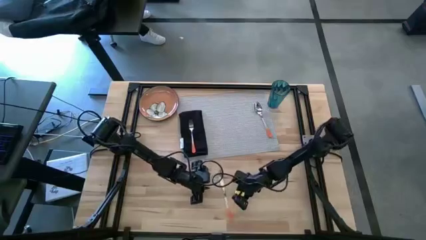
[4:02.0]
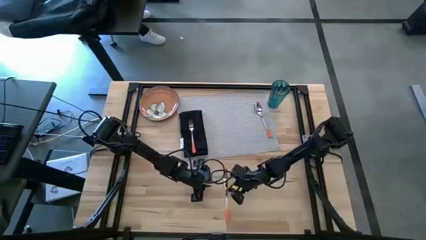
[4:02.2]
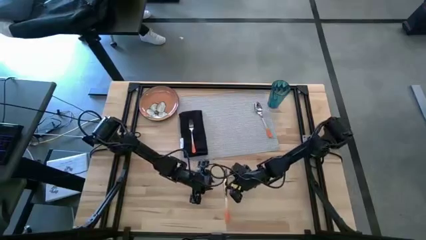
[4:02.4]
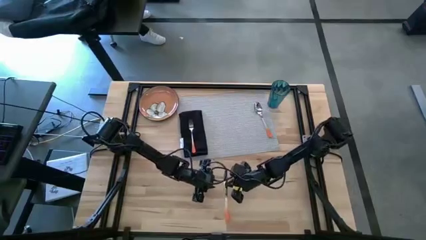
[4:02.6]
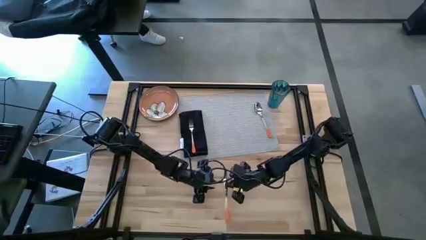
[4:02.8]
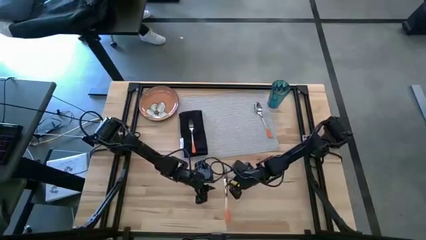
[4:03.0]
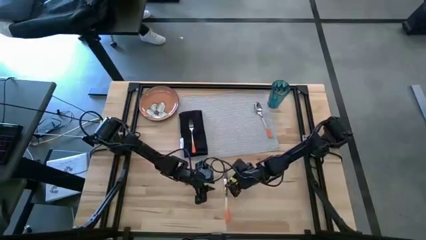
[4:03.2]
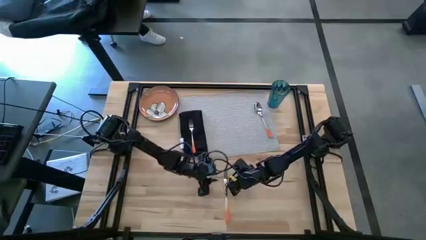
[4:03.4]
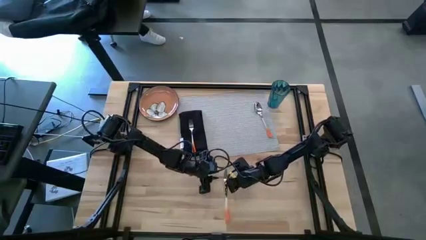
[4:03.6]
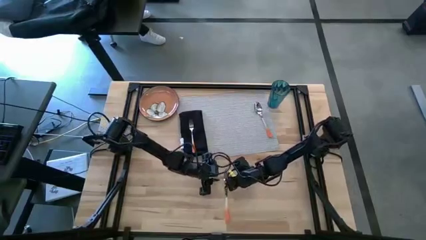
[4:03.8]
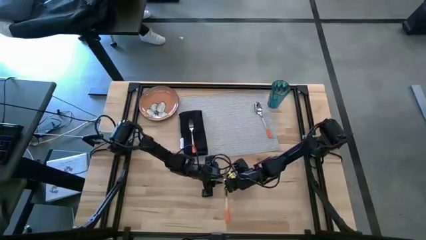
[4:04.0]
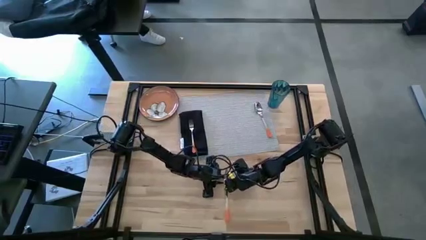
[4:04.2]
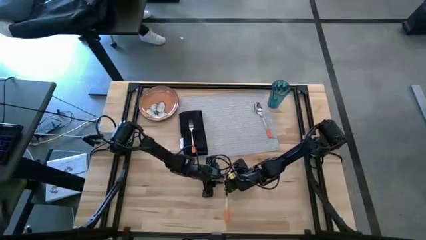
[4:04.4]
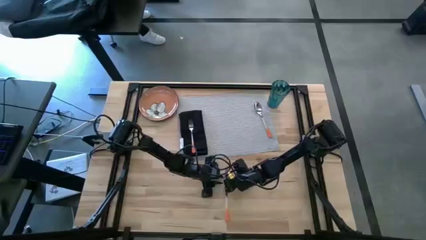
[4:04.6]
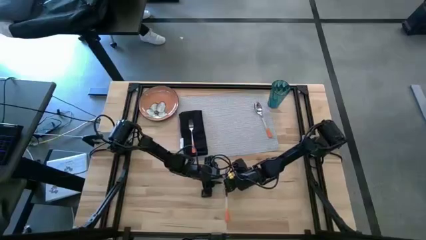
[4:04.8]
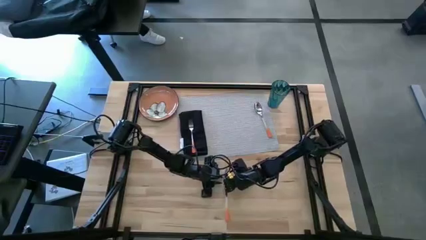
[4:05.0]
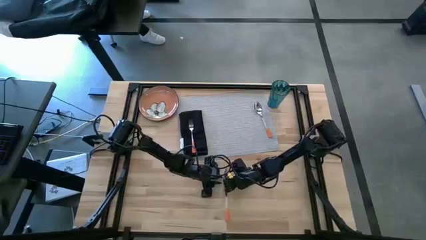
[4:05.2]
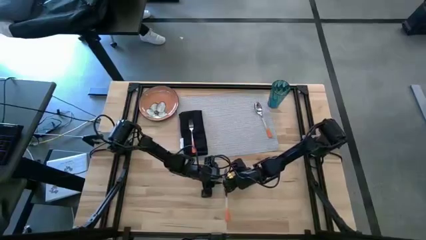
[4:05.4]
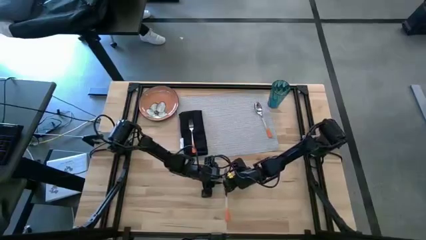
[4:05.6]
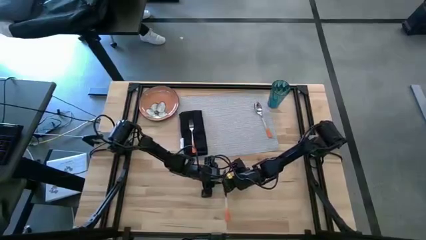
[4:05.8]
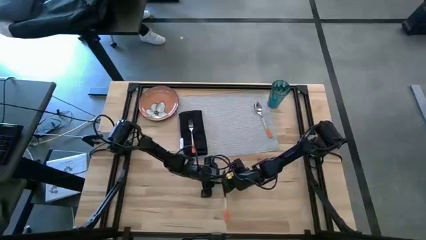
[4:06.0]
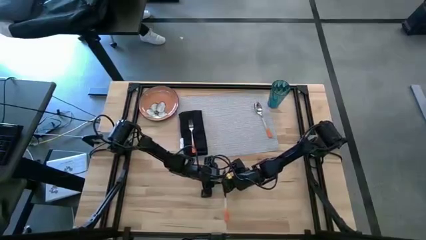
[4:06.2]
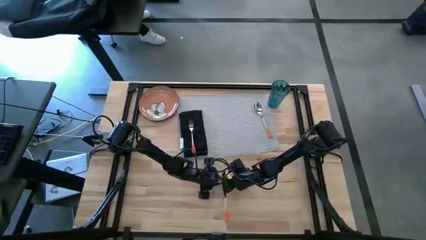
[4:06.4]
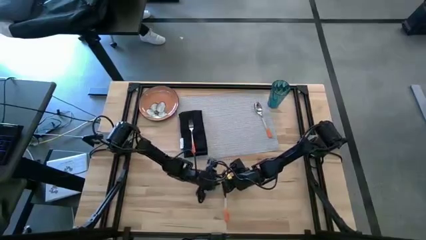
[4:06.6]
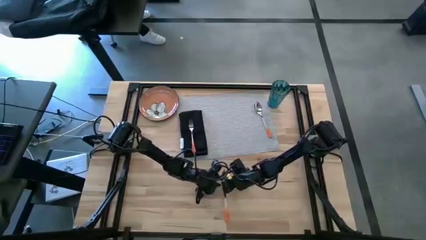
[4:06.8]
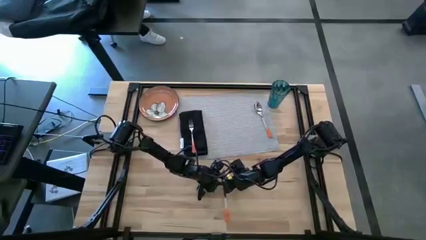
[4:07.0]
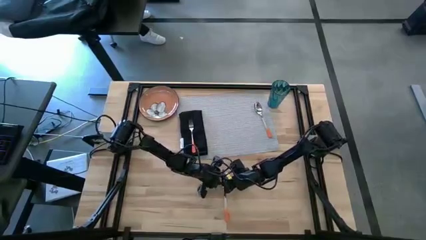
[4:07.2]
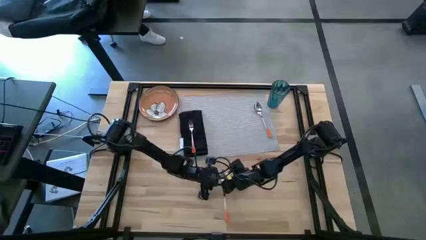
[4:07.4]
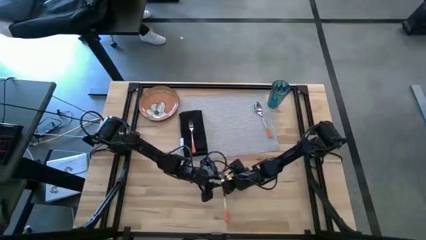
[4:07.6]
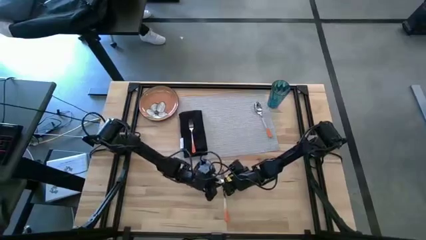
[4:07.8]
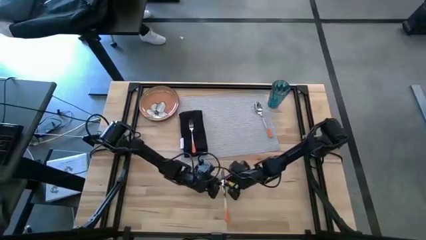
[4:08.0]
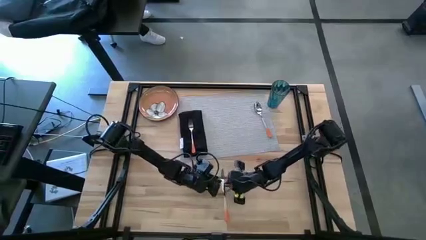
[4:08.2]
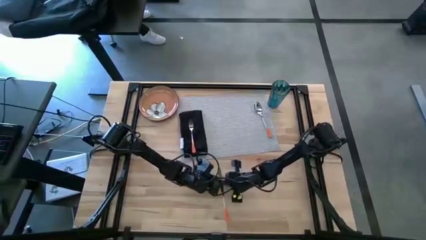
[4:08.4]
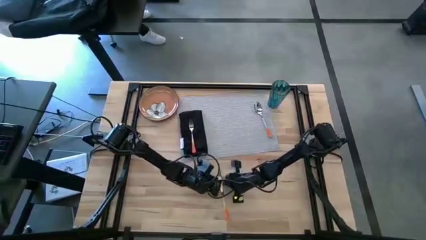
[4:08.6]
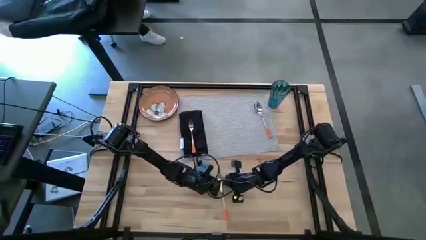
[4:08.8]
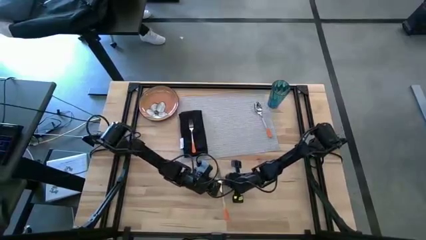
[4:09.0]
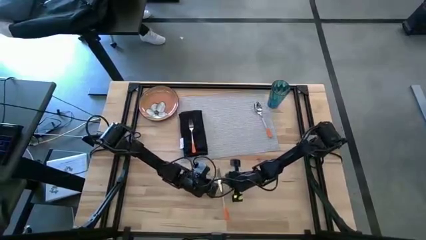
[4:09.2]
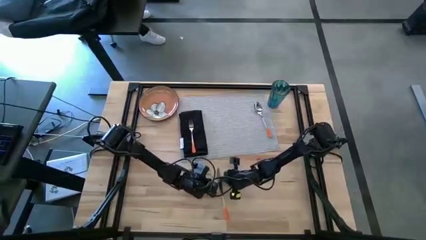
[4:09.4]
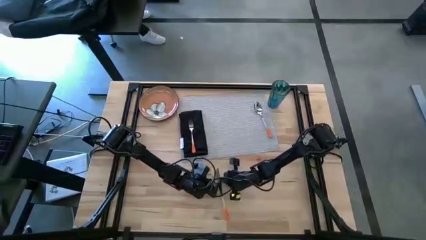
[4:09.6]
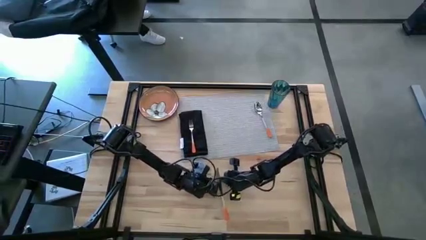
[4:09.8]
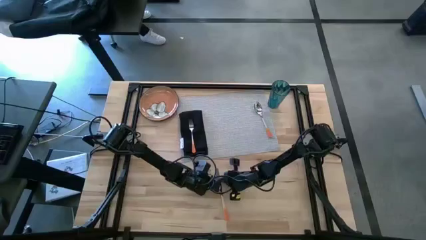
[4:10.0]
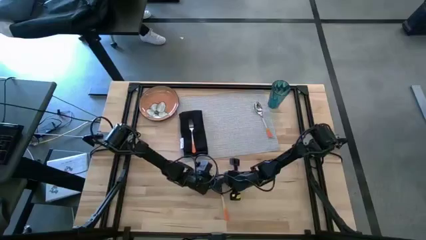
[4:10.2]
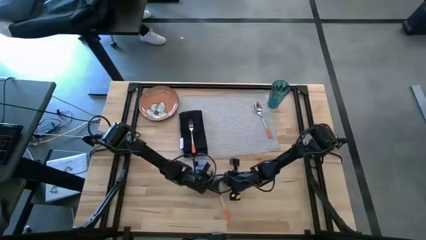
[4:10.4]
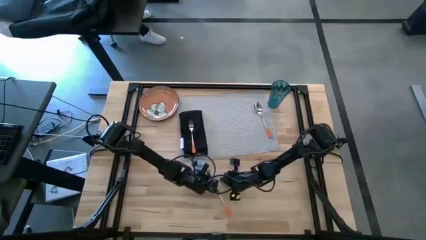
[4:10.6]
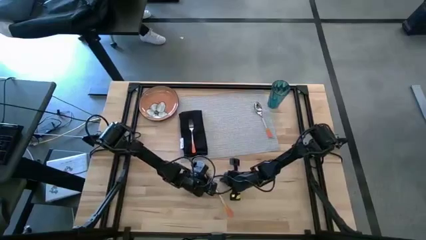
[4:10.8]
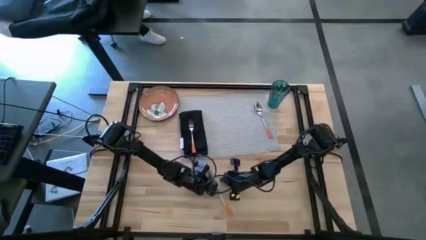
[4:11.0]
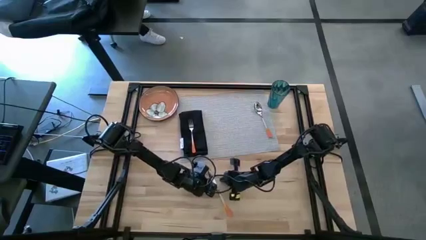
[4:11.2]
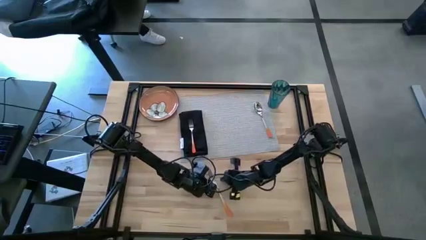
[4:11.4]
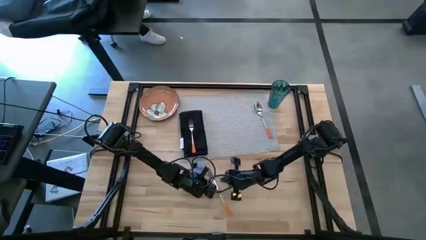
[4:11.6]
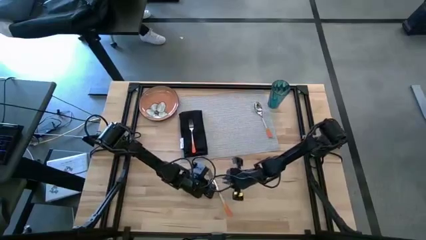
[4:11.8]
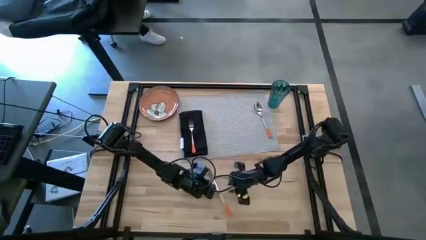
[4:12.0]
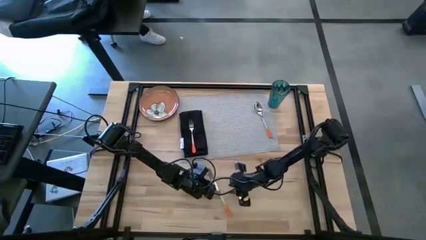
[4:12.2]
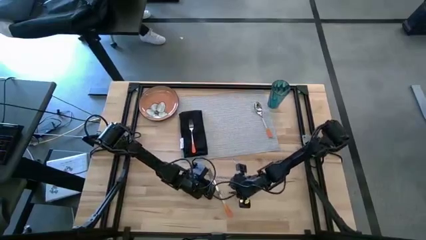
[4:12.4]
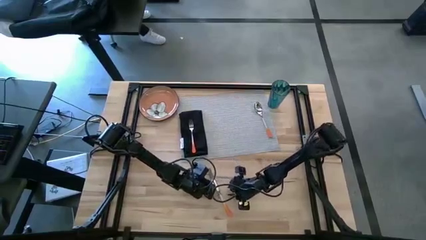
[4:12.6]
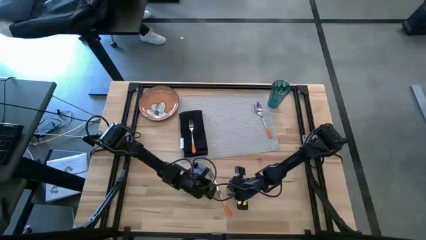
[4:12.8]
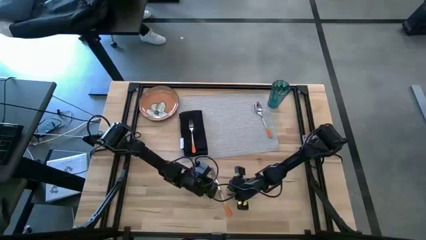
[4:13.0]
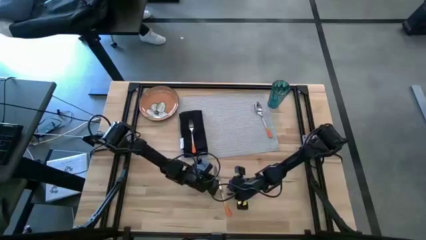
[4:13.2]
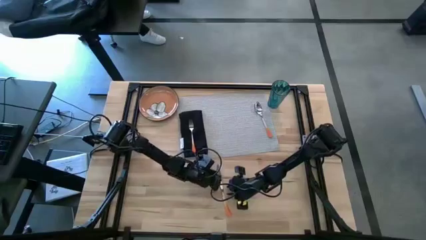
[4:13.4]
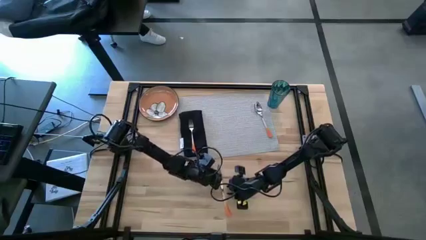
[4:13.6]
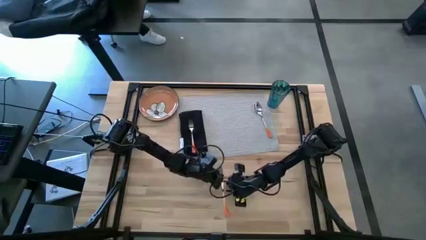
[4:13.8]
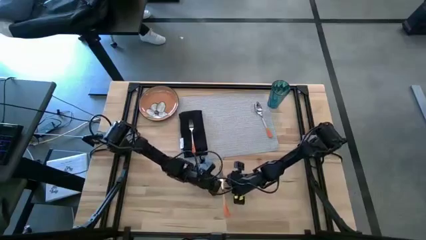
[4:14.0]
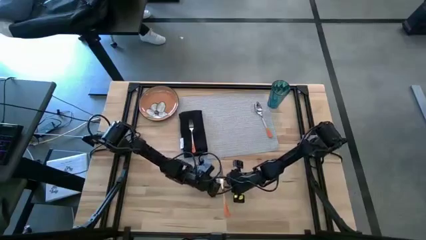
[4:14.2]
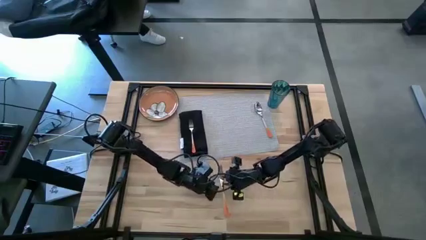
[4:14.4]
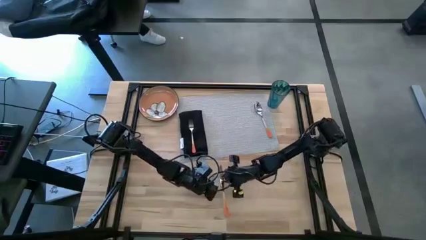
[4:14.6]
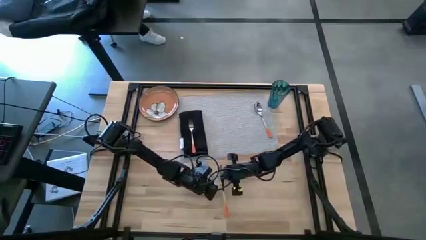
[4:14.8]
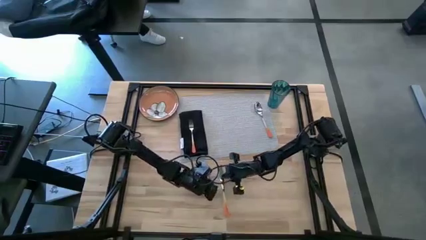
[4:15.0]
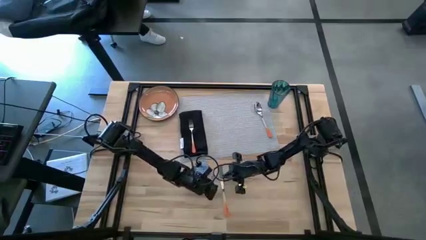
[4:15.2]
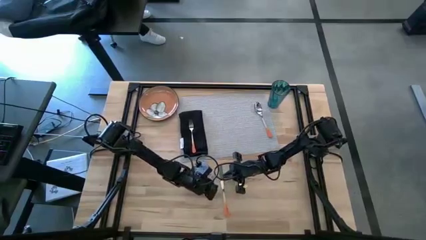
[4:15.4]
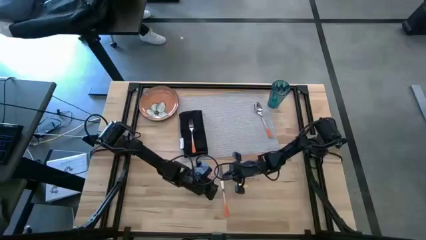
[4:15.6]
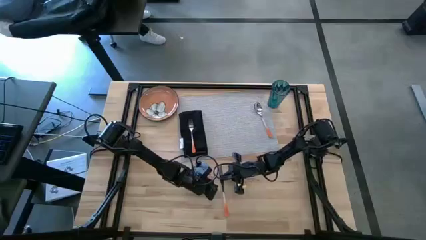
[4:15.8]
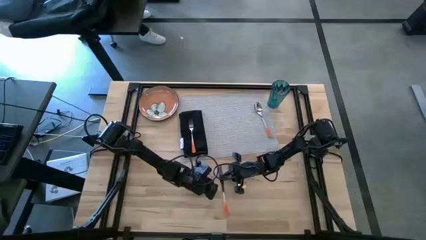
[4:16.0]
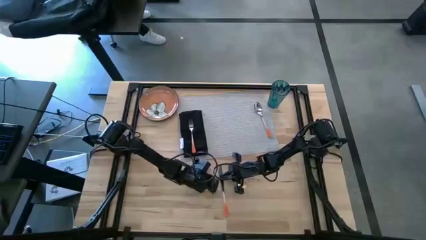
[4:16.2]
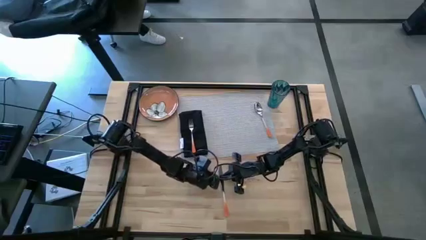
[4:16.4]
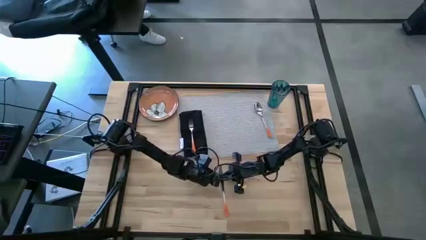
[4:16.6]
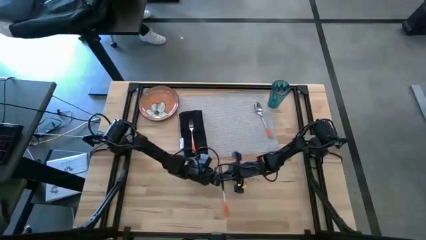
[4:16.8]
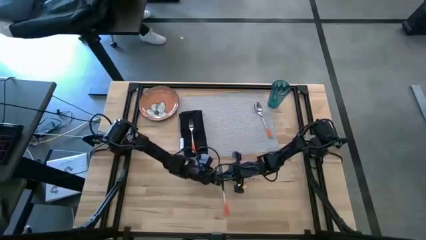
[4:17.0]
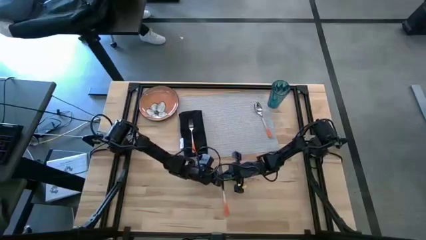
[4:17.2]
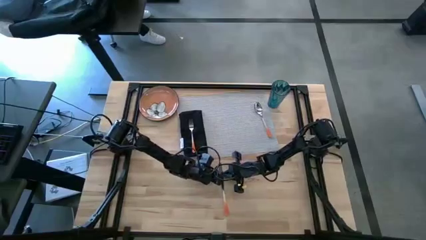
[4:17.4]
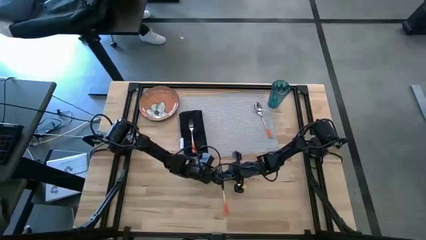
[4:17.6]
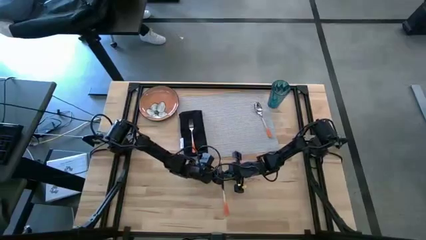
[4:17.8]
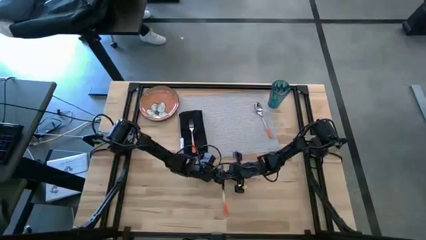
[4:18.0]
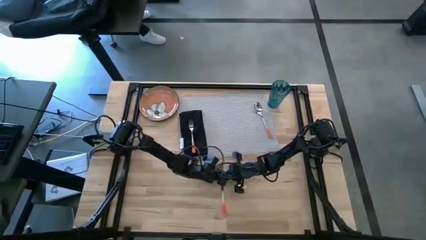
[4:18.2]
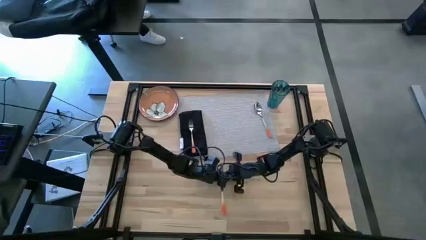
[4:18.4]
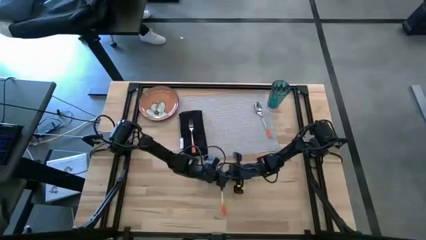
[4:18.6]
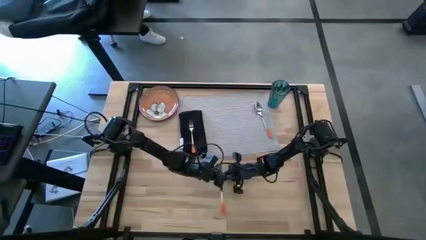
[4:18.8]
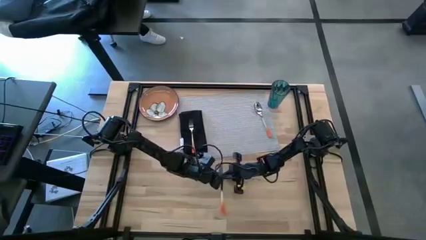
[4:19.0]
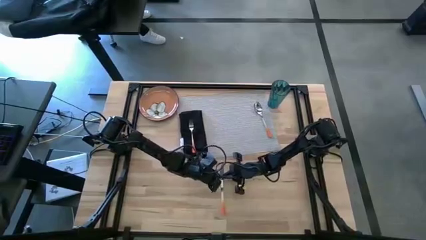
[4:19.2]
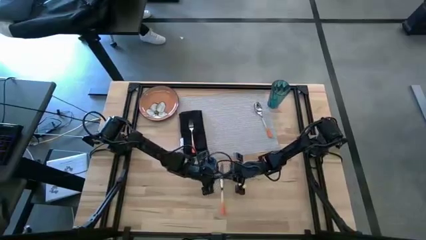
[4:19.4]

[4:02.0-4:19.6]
Task: Set table place
Put the orange table knife on the gray table mat beside the orange spoon
